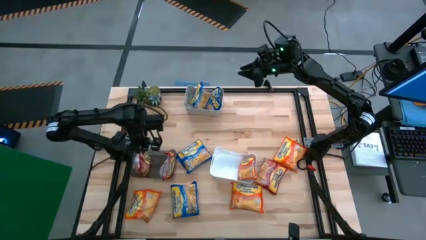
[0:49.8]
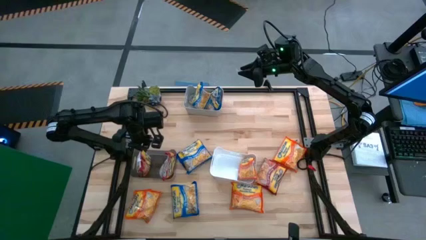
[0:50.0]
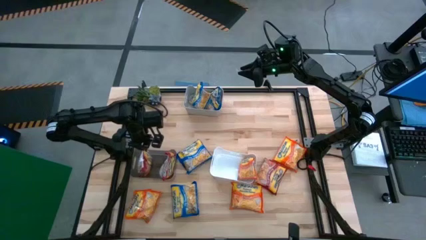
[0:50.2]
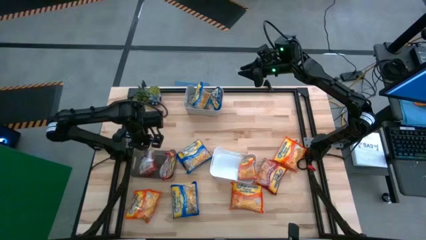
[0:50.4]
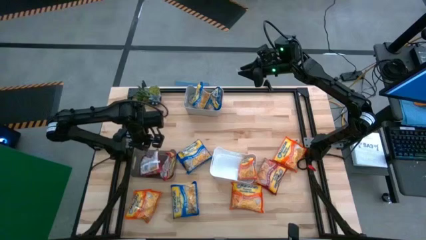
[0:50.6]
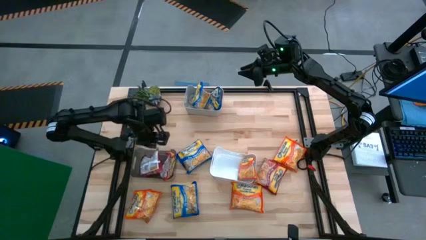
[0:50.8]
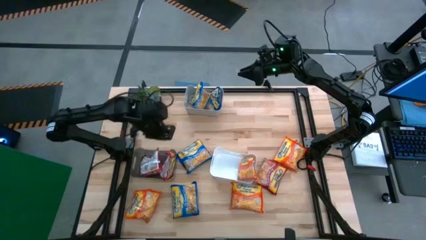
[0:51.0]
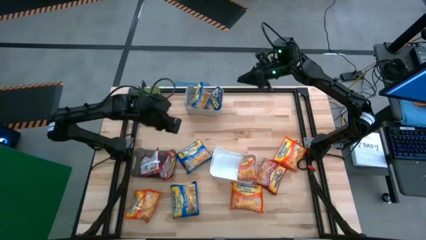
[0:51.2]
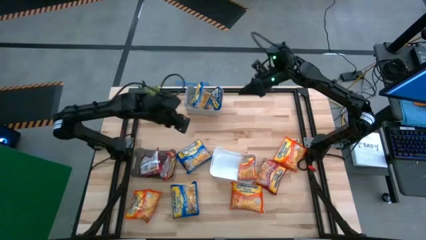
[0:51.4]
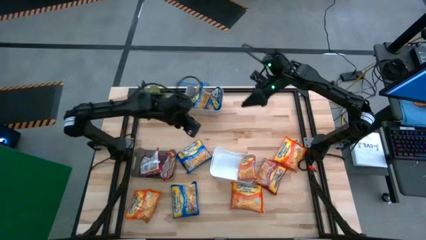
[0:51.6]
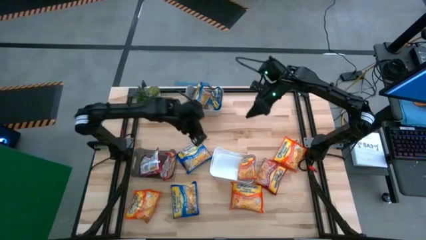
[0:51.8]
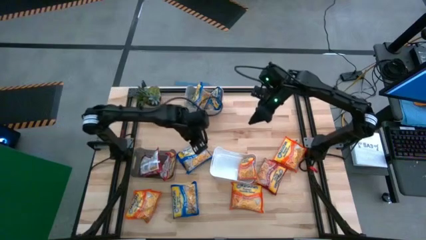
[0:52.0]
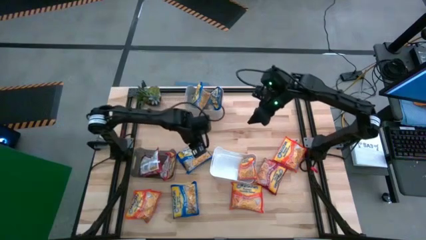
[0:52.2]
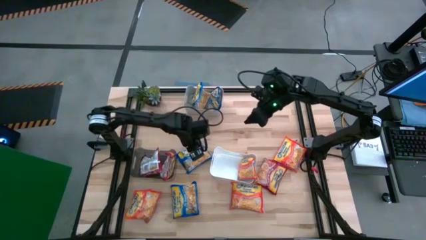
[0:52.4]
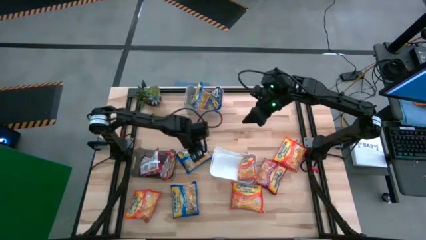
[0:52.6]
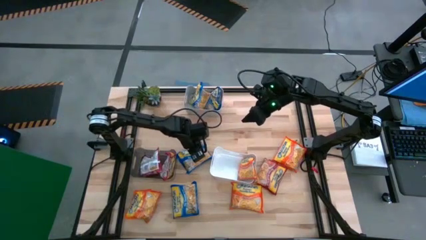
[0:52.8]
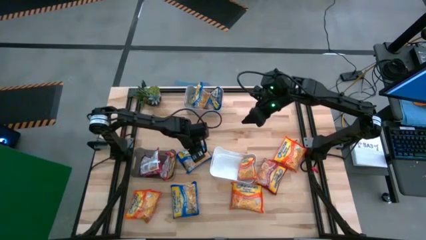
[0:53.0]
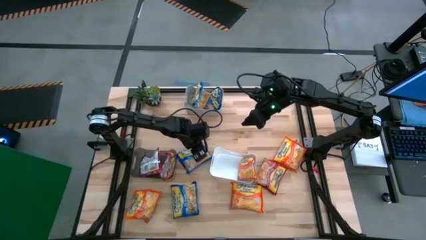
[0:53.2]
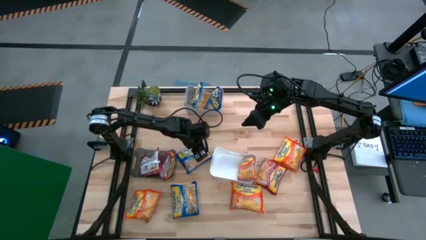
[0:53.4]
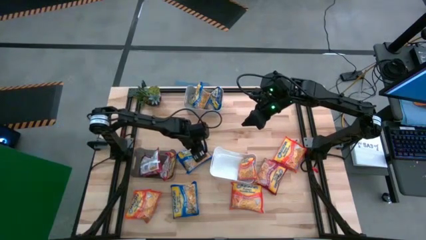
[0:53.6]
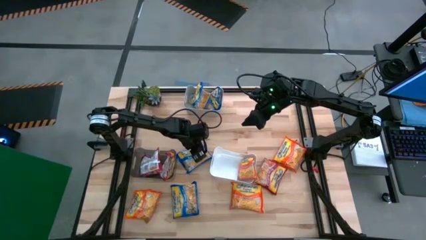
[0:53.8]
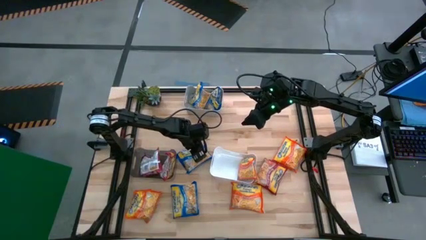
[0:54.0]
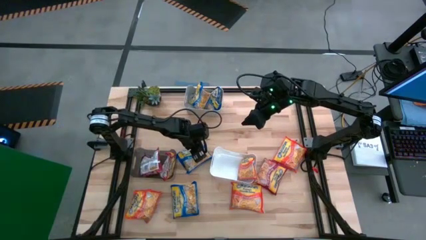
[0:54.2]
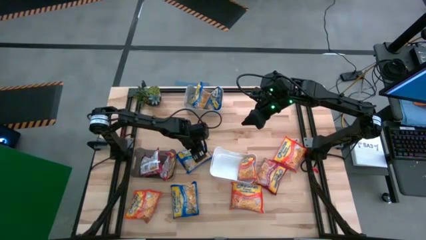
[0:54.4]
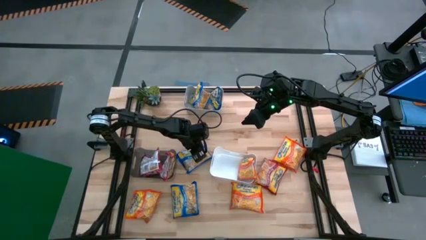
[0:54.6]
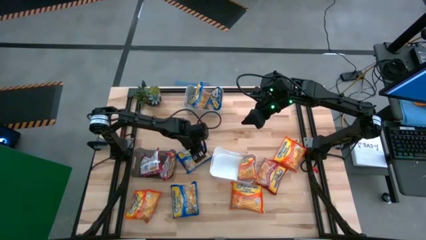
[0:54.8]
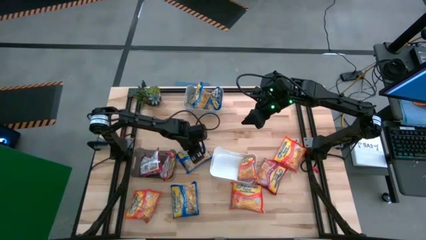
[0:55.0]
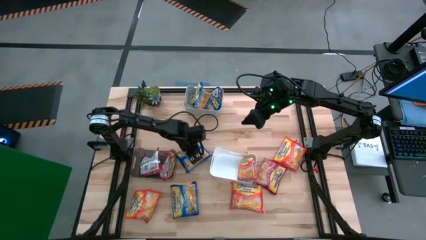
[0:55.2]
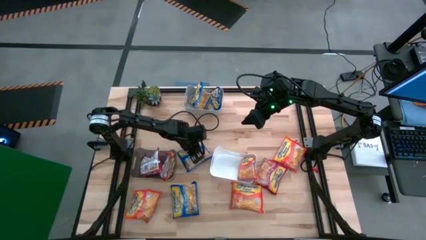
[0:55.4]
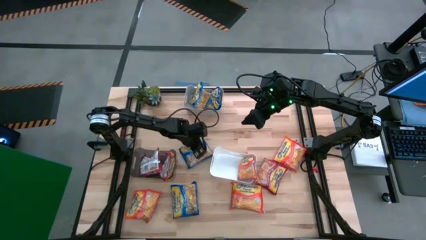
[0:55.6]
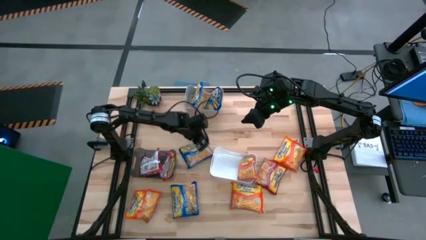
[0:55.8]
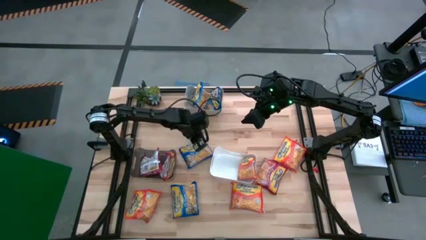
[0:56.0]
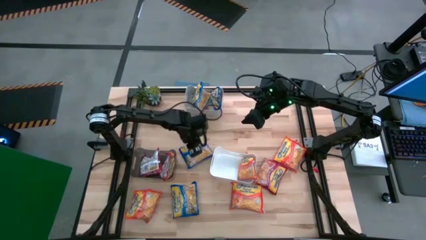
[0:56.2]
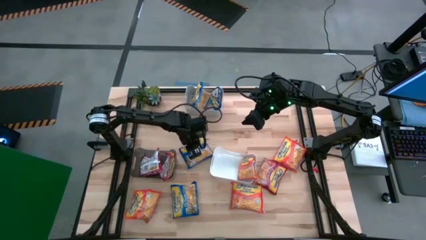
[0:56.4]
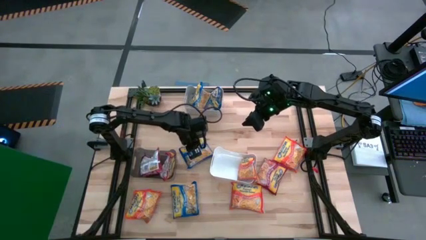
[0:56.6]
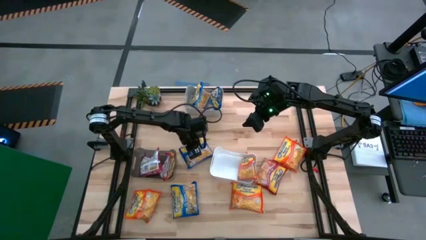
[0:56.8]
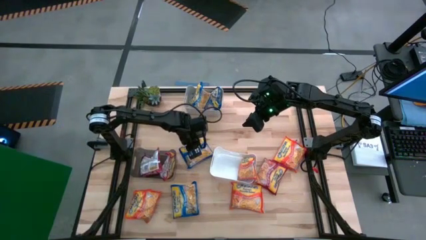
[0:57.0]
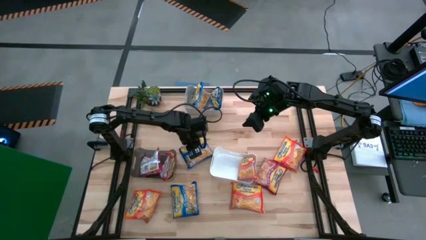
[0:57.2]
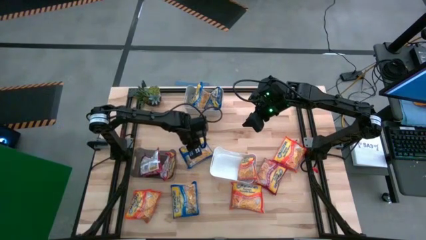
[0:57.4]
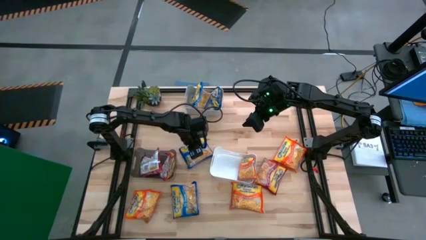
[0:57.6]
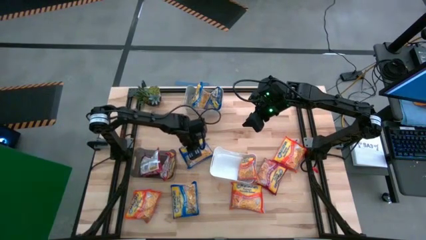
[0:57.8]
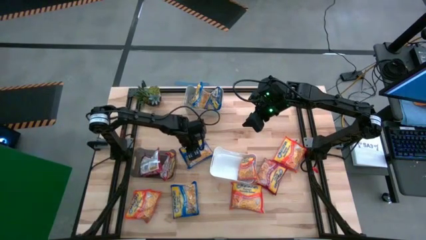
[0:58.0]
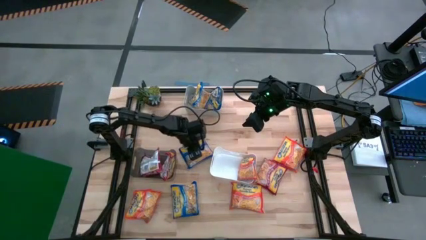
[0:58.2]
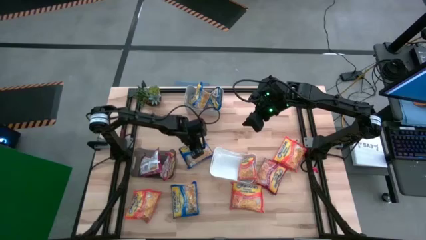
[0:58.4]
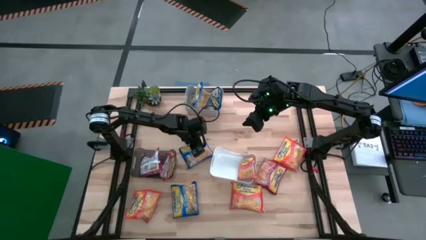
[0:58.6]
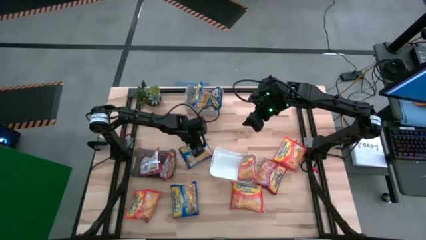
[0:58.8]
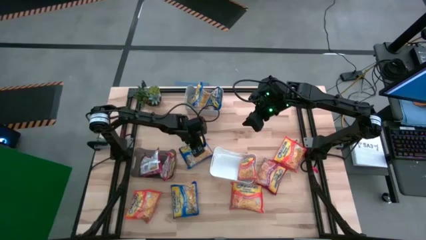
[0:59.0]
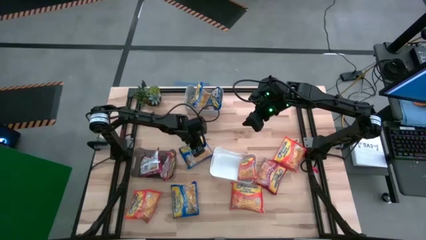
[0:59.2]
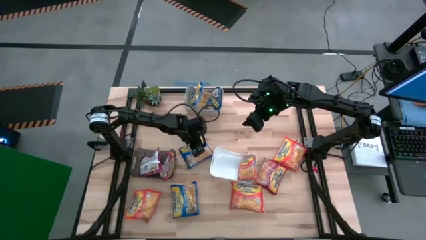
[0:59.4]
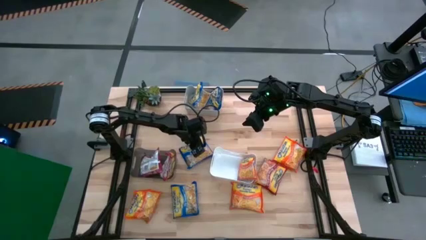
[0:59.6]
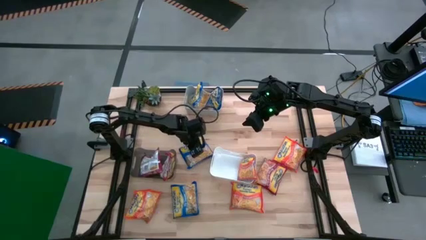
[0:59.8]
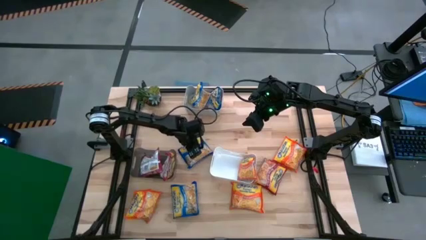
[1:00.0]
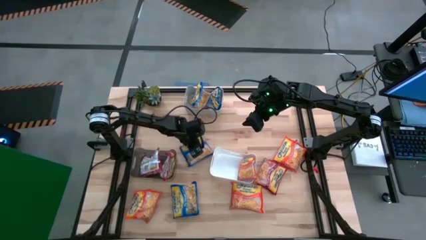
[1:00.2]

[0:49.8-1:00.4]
Task: Sort Maruchan noodles
Put the blue noodle pack into the gray bin
